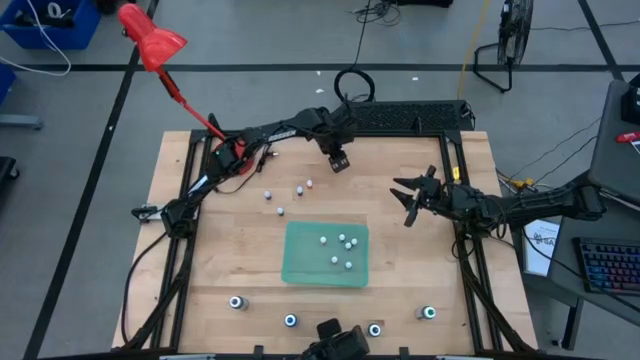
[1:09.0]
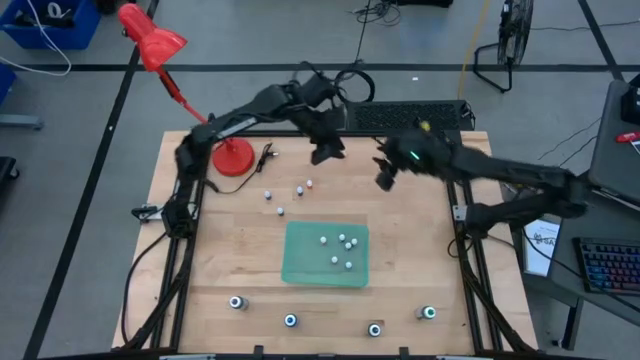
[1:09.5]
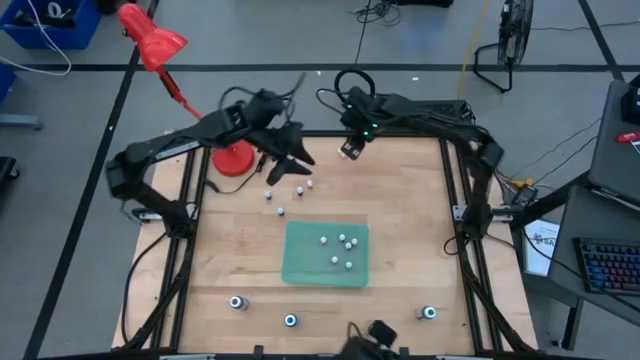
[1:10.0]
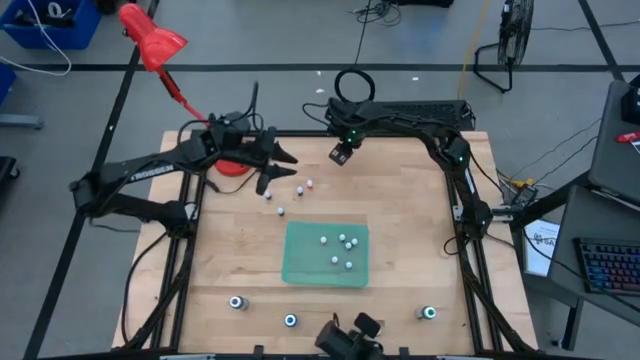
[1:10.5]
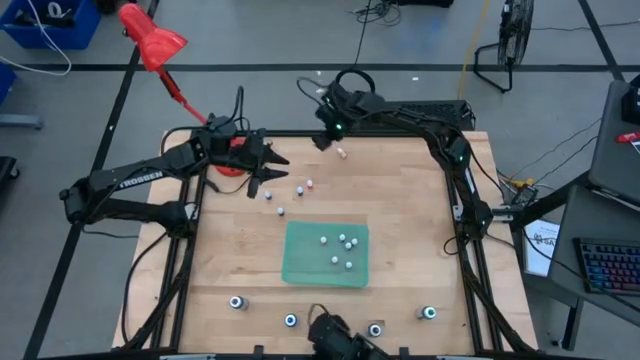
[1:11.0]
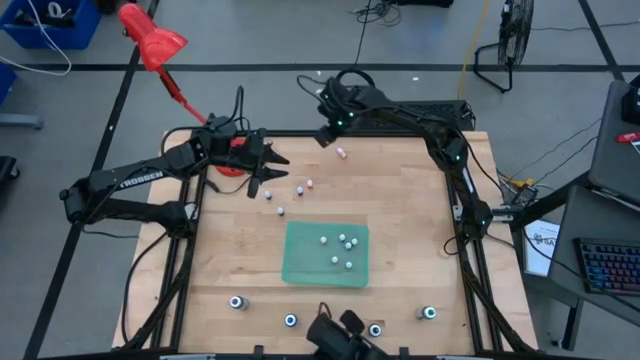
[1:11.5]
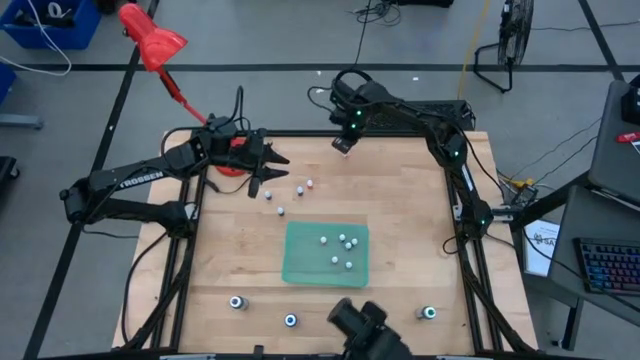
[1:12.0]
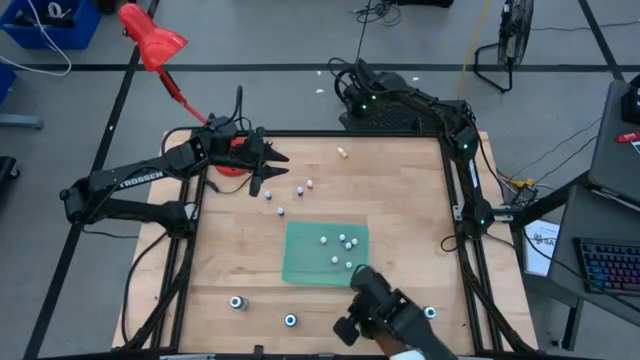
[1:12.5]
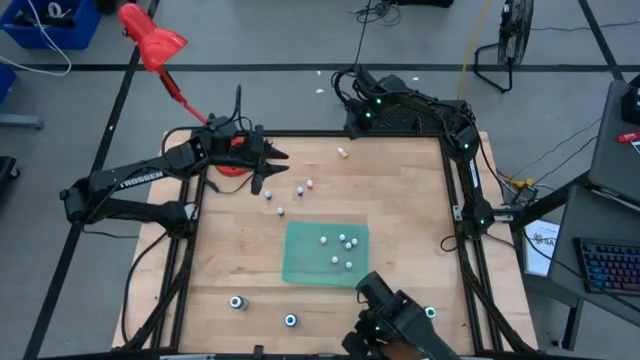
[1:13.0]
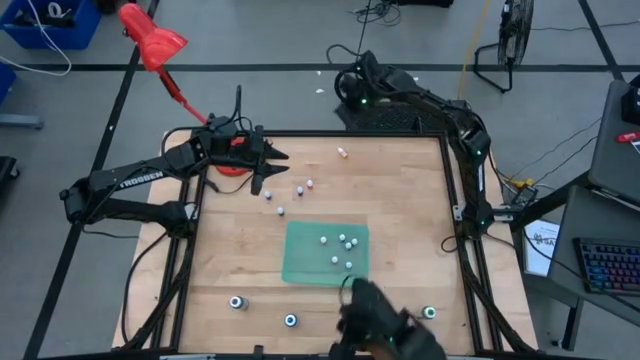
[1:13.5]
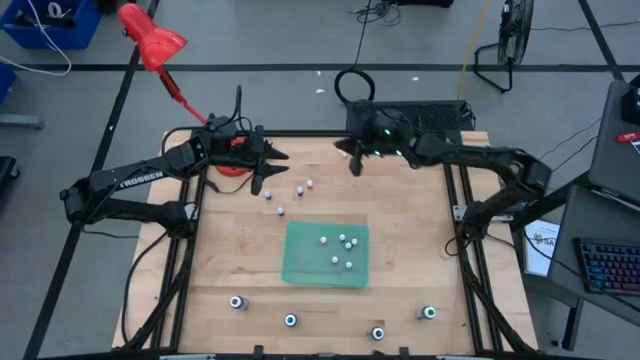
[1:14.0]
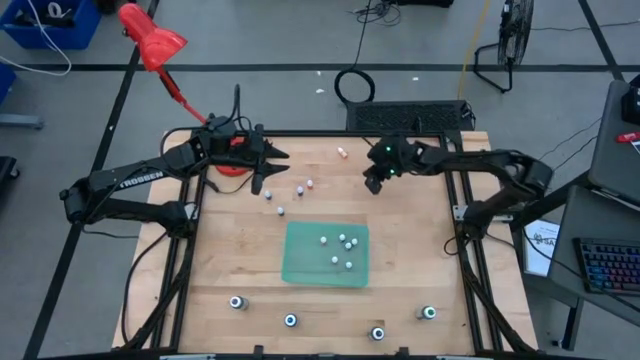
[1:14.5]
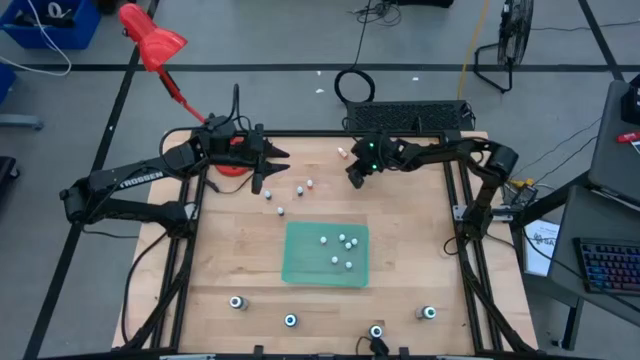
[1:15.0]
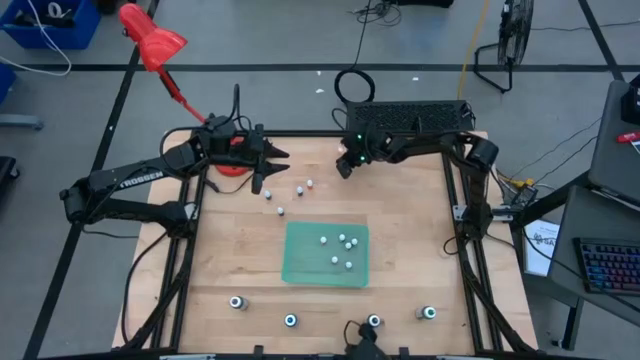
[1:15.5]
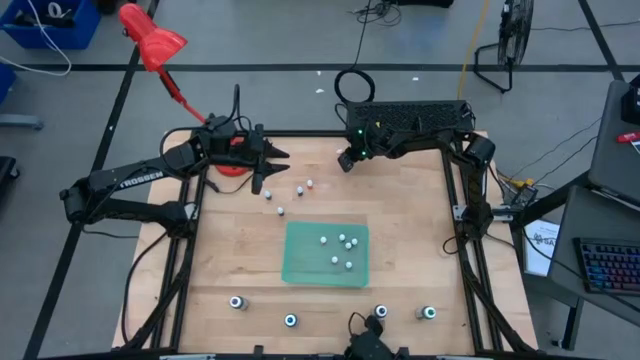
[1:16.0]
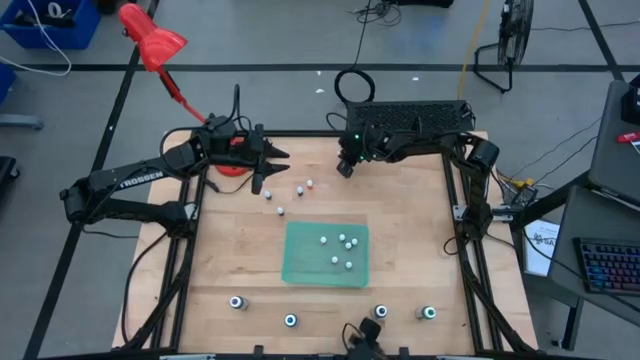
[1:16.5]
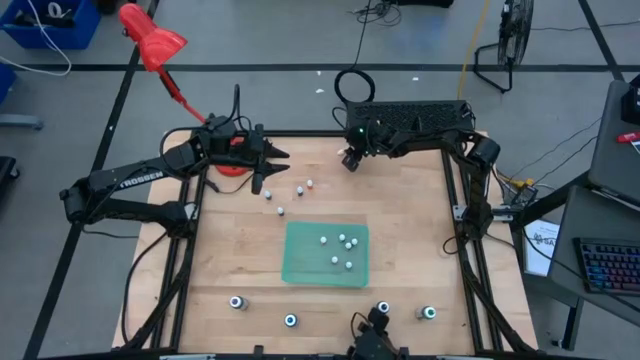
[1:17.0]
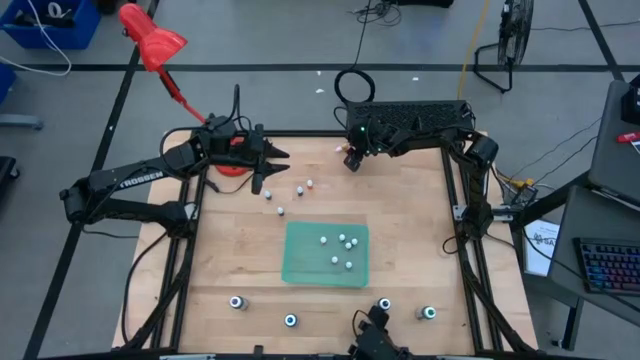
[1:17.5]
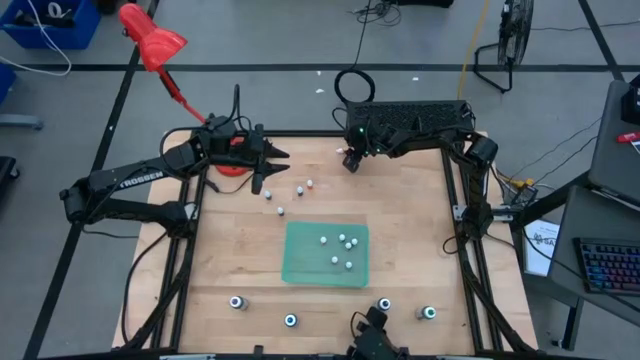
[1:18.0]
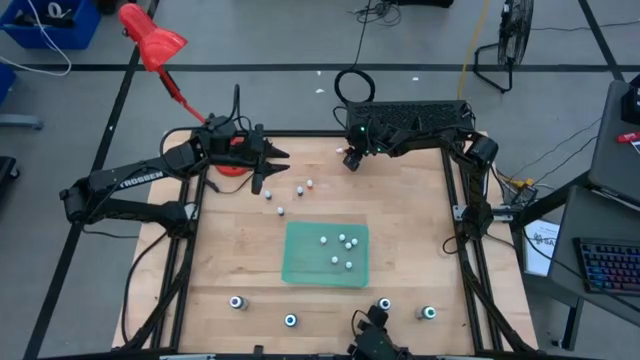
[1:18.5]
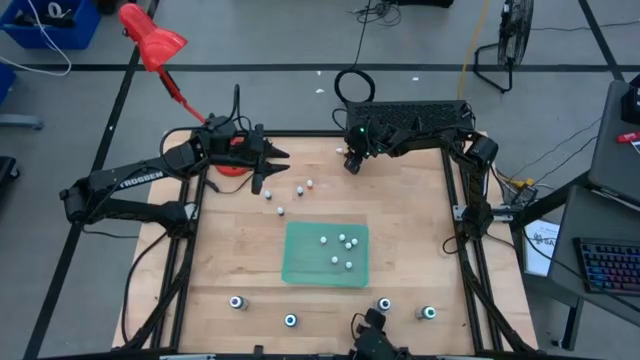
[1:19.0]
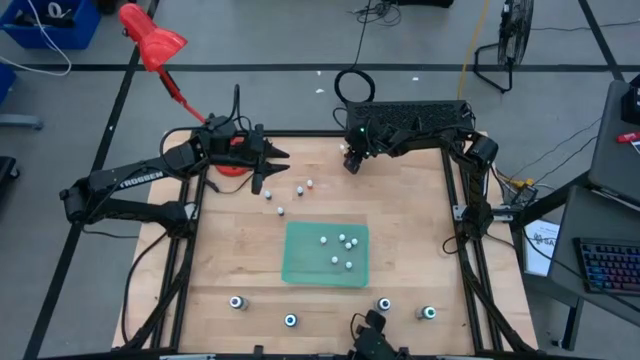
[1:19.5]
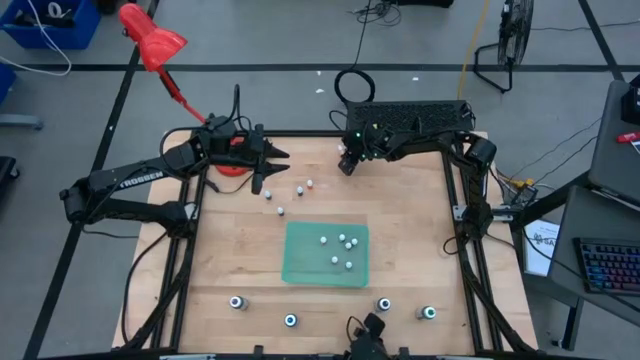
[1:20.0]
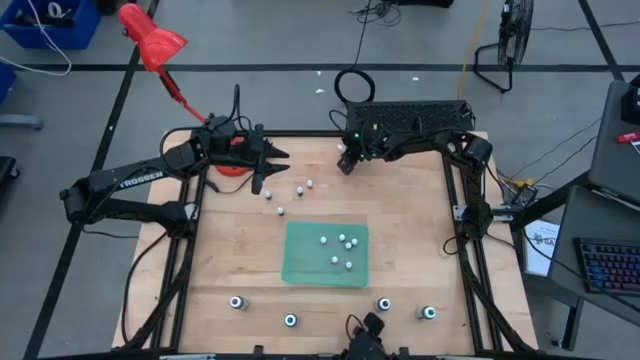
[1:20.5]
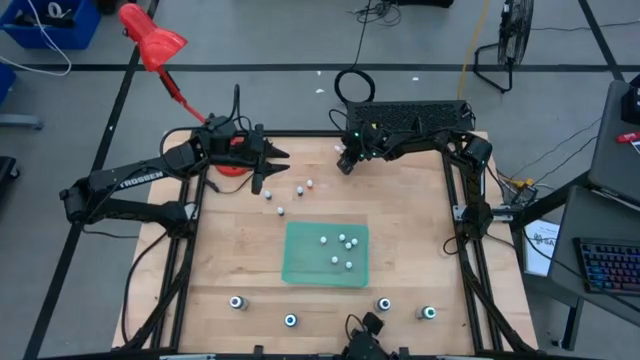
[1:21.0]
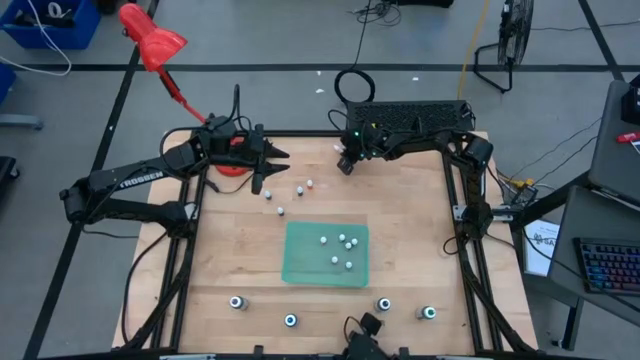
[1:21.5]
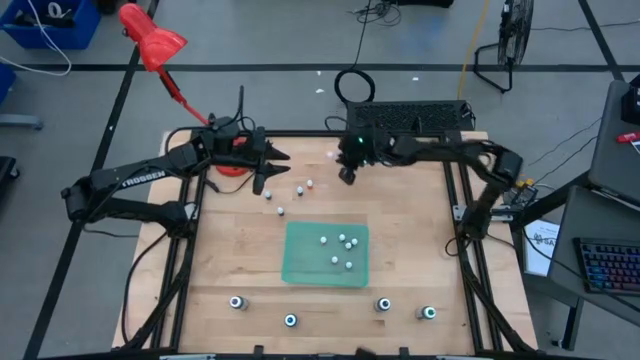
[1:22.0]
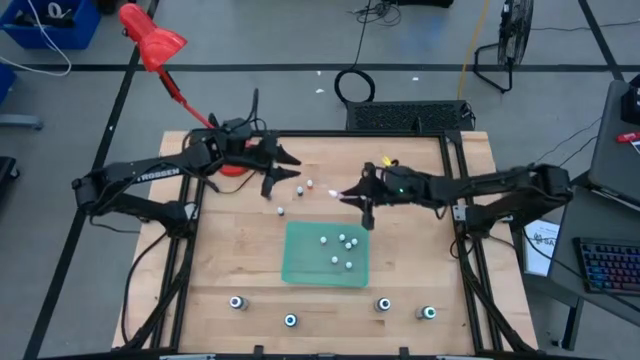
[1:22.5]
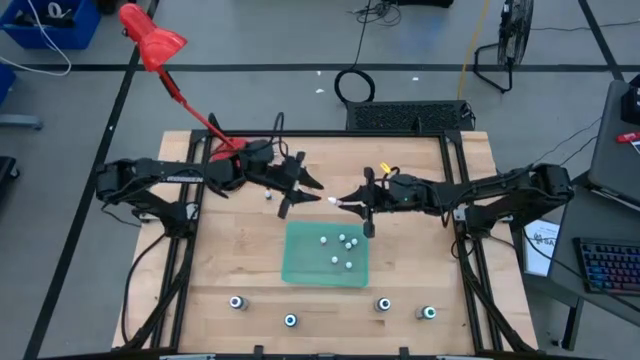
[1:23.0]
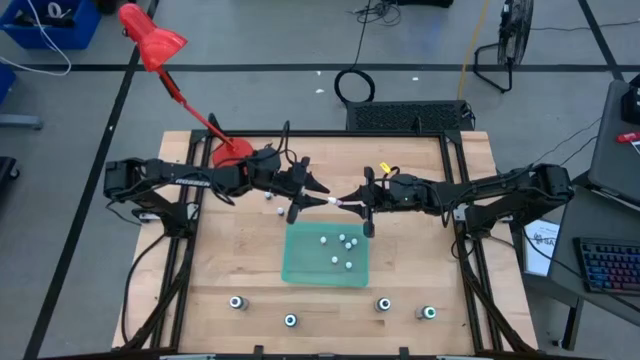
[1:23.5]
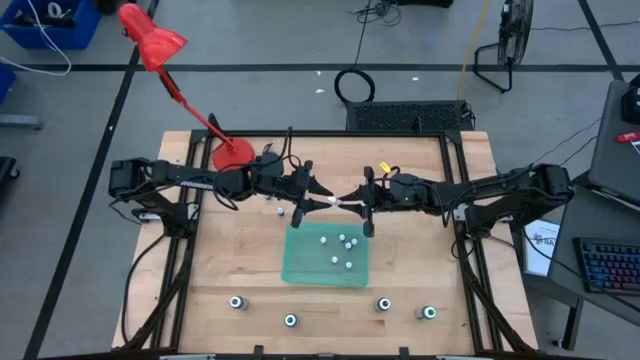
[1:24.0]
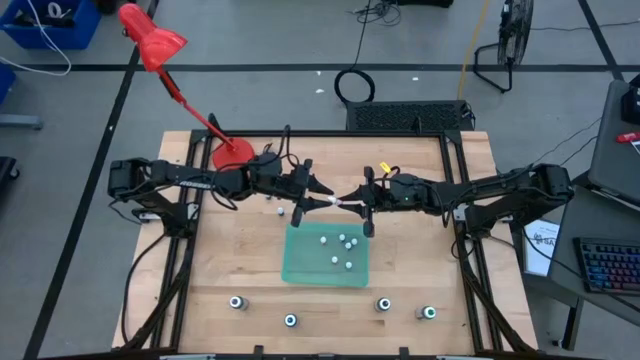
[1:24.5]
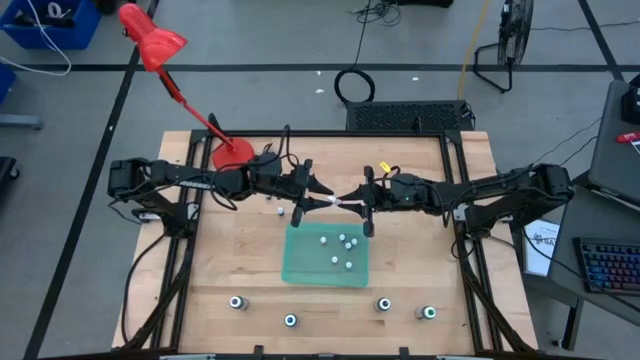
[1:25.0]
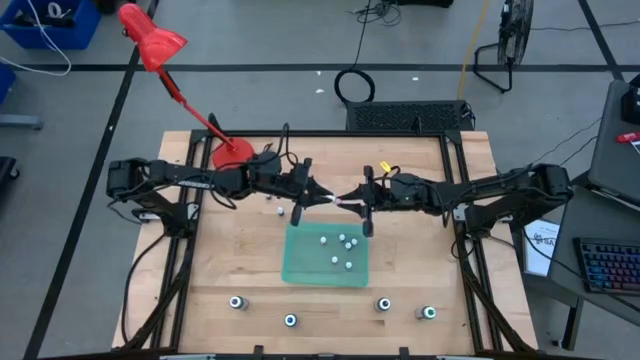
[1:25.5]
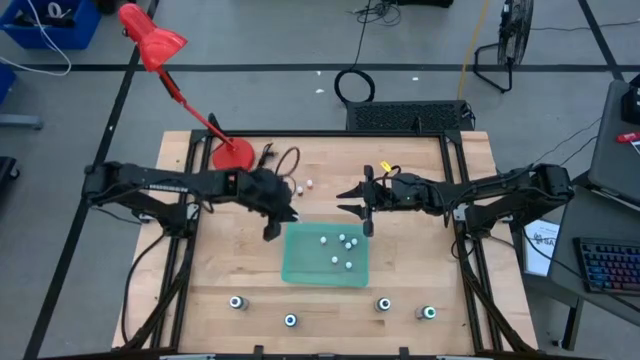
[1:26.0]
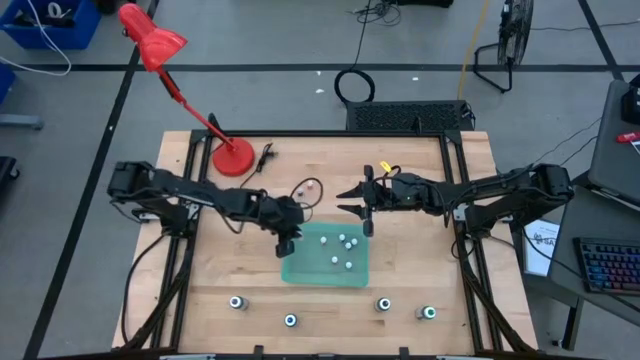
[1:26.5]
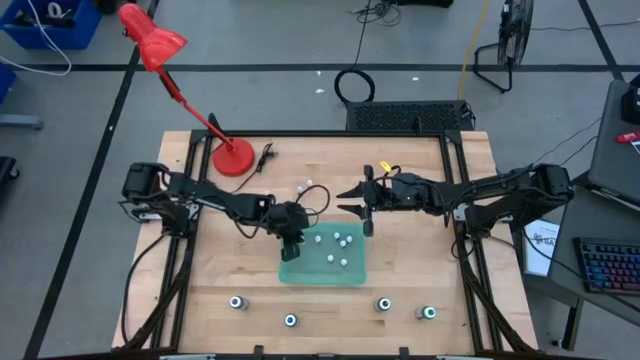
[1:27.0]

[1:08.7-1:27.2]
Task: Pick & Place food coloring
Put the small orange food coloring bottle into the green bin

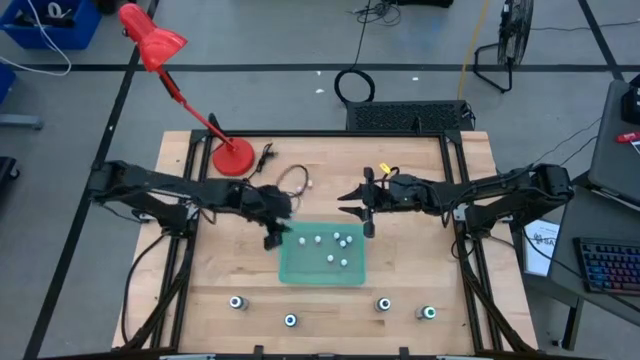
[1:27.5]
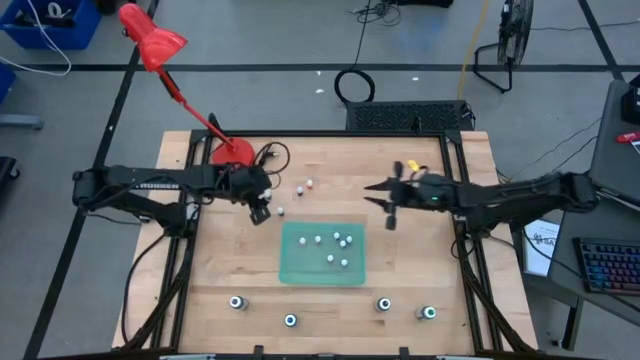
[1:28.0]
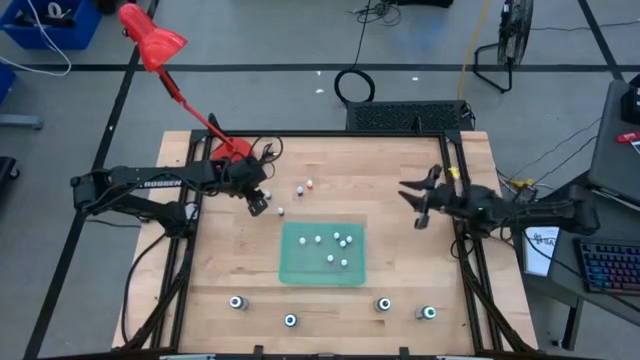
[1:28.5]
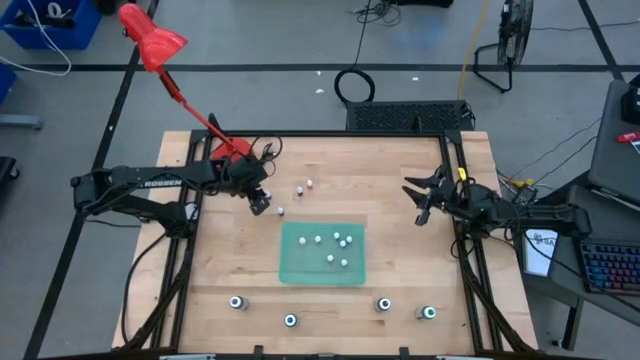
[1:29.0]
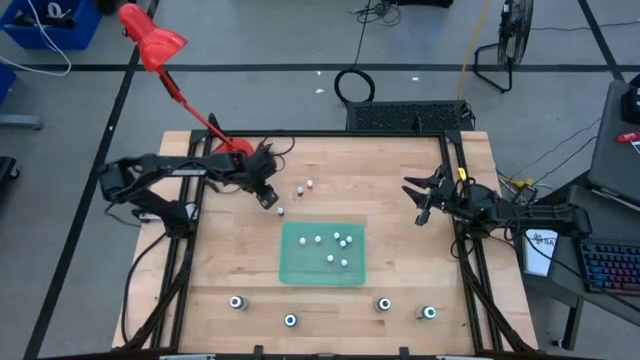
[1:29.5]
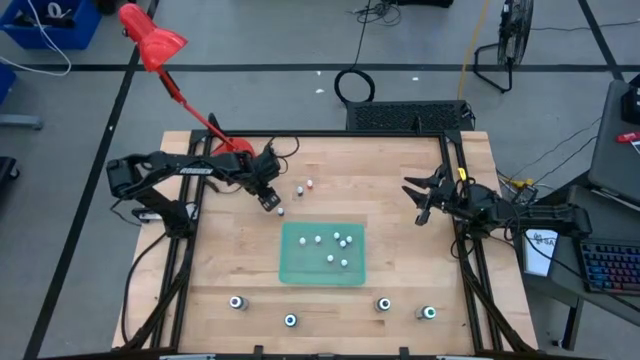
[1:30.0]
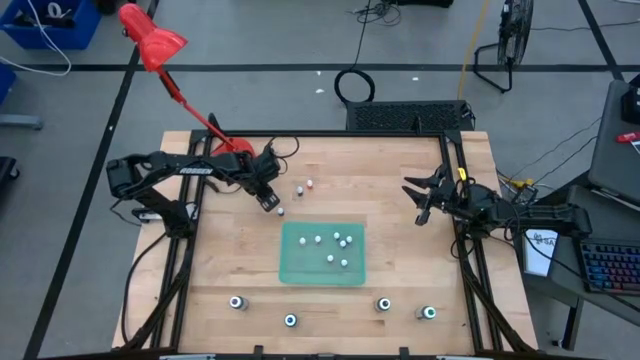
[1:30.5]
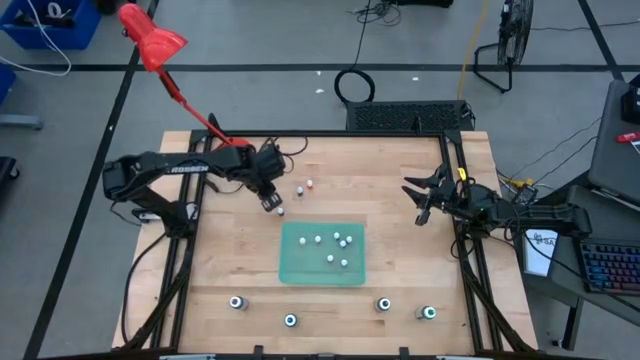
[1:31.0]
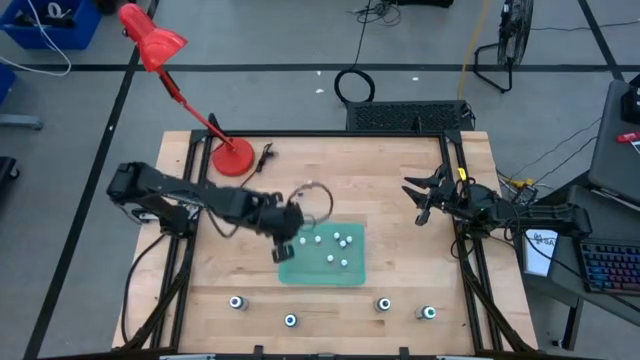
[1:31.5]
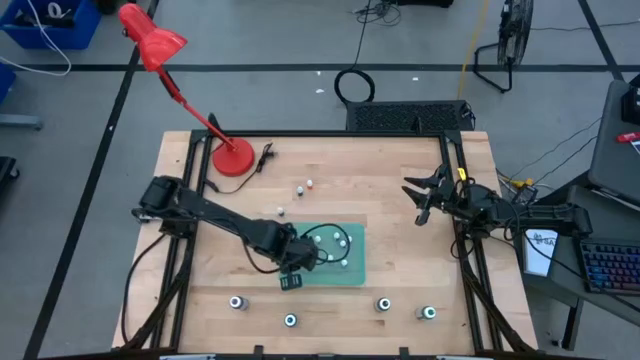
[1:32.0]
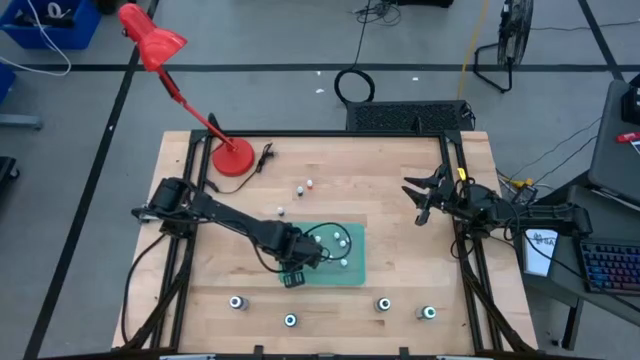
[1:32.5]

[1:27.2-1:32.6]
Put the small blue food coloring bottle into the green bin
